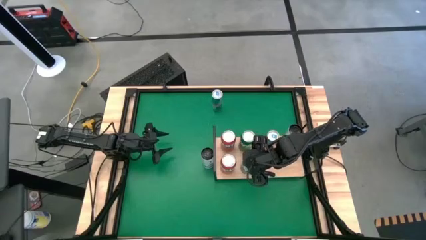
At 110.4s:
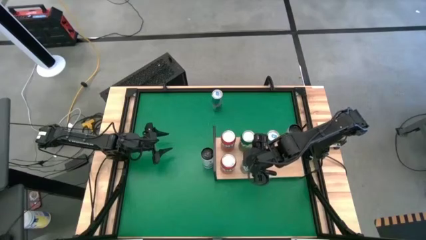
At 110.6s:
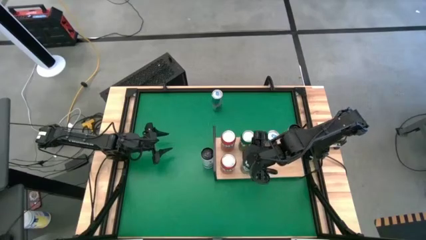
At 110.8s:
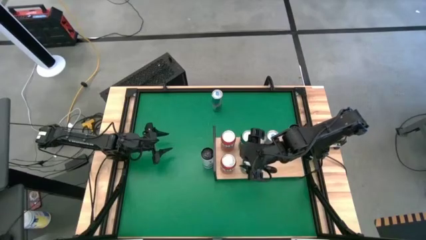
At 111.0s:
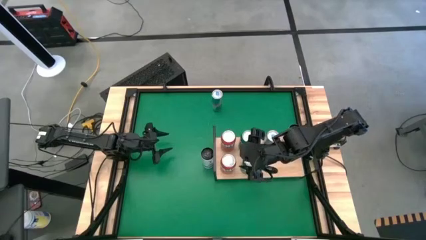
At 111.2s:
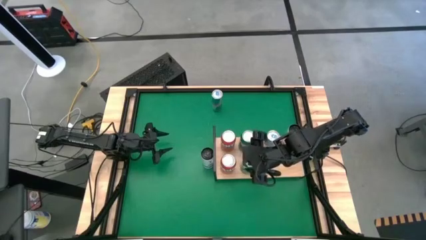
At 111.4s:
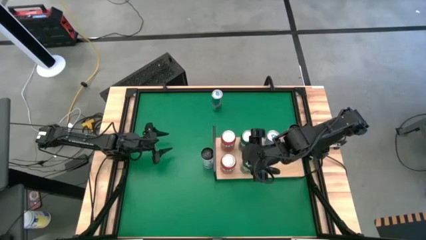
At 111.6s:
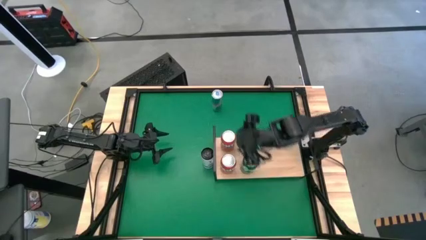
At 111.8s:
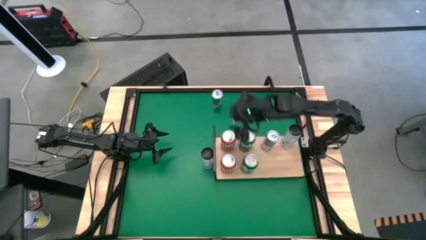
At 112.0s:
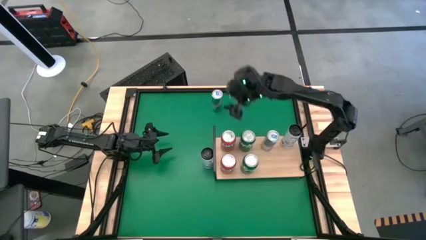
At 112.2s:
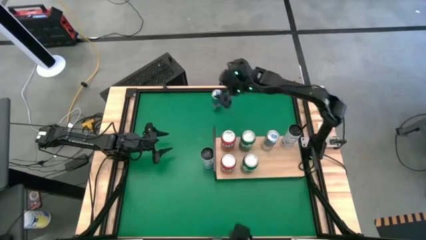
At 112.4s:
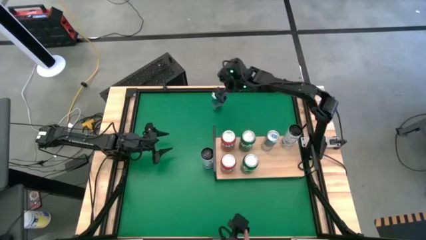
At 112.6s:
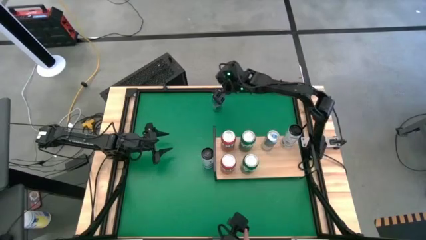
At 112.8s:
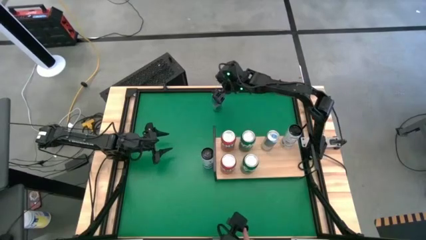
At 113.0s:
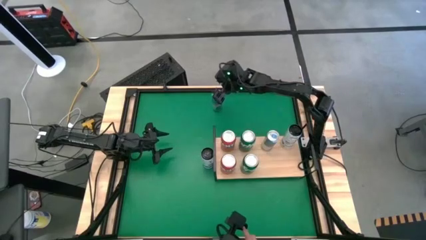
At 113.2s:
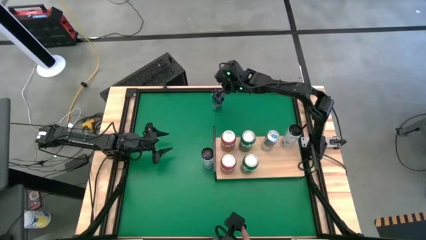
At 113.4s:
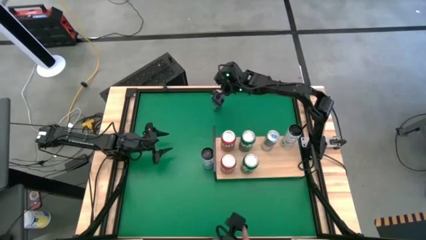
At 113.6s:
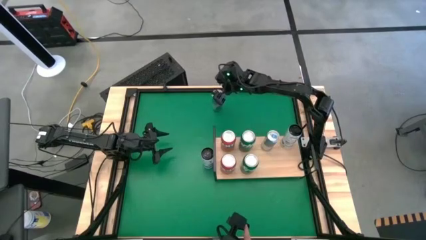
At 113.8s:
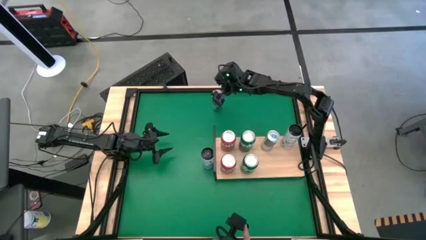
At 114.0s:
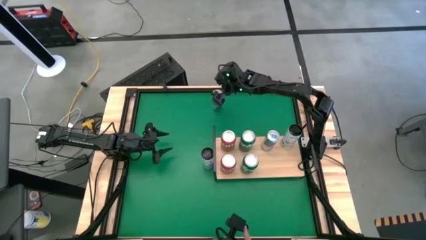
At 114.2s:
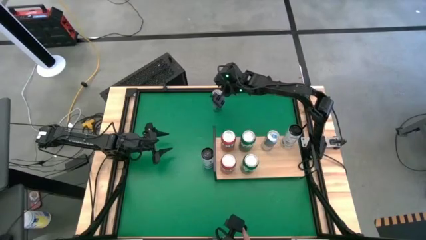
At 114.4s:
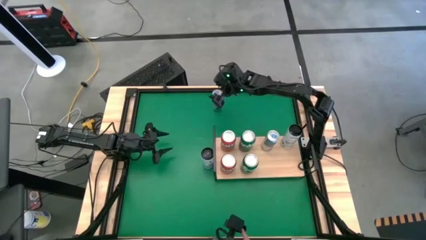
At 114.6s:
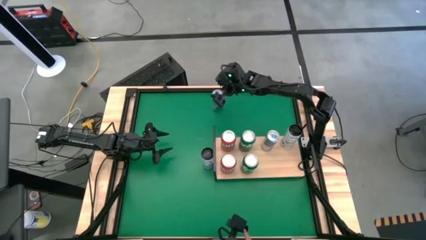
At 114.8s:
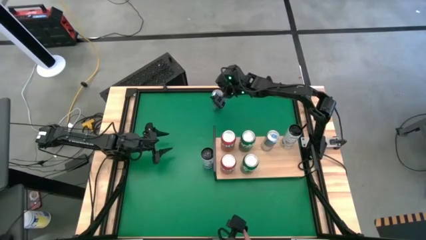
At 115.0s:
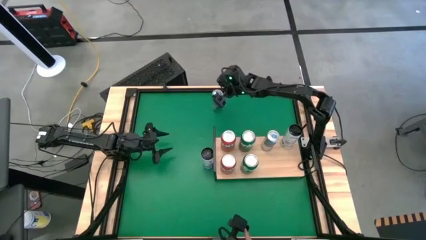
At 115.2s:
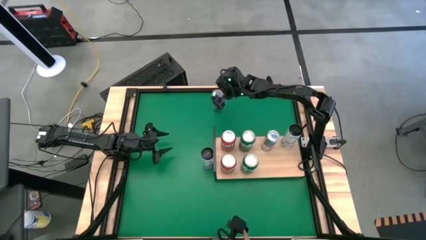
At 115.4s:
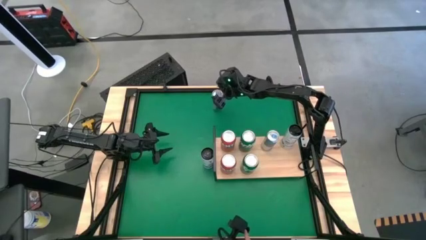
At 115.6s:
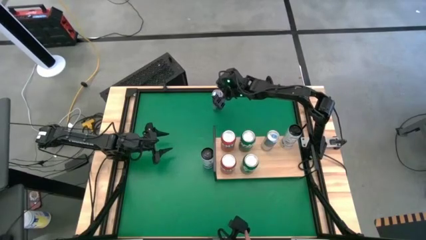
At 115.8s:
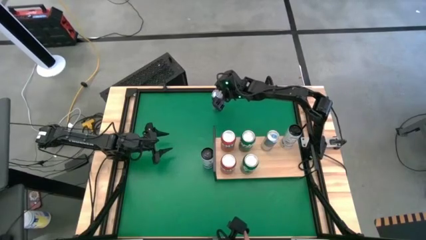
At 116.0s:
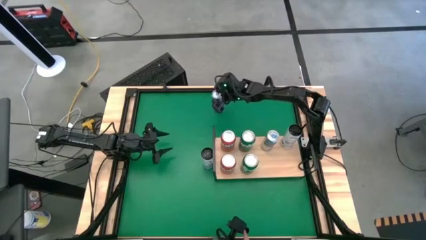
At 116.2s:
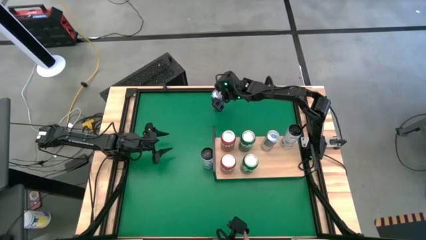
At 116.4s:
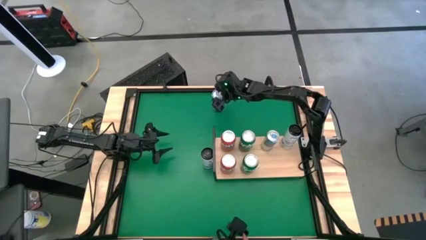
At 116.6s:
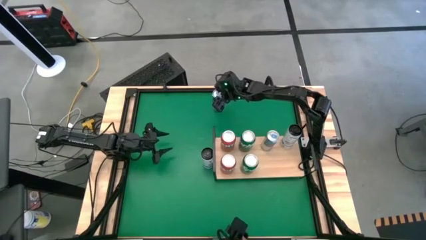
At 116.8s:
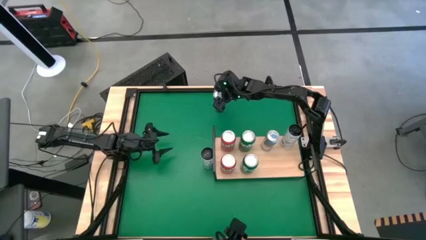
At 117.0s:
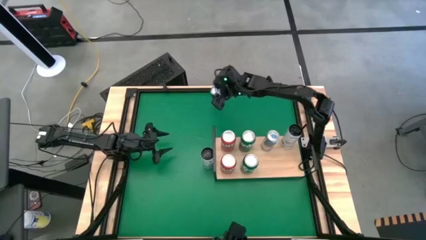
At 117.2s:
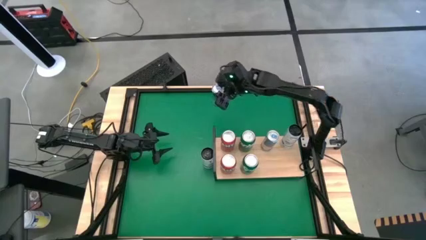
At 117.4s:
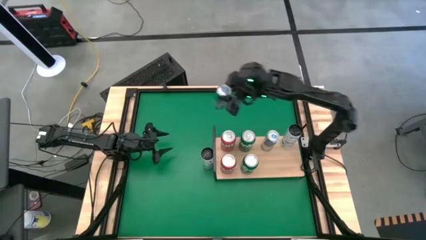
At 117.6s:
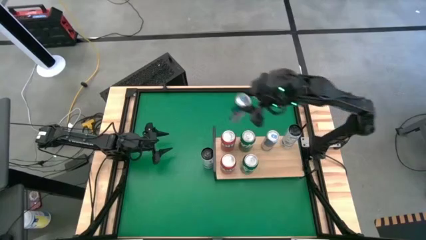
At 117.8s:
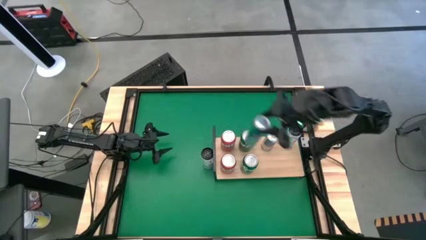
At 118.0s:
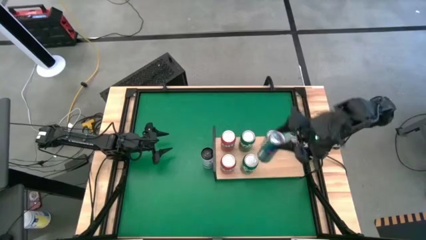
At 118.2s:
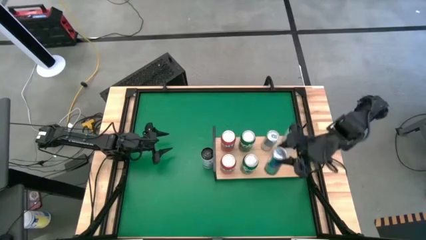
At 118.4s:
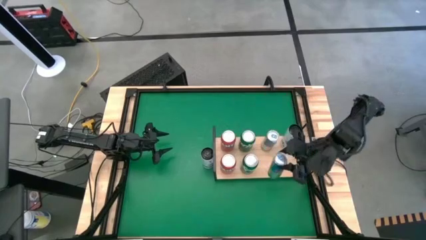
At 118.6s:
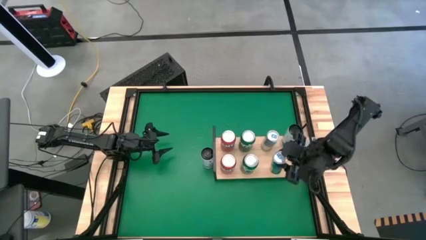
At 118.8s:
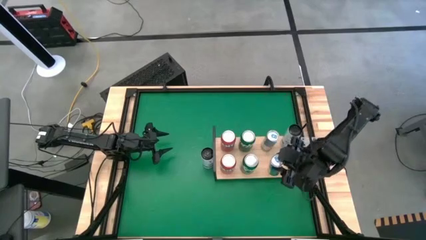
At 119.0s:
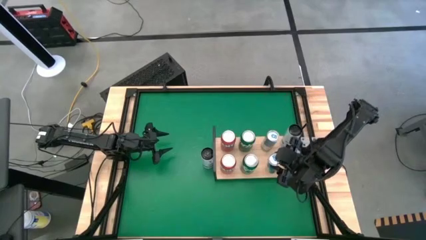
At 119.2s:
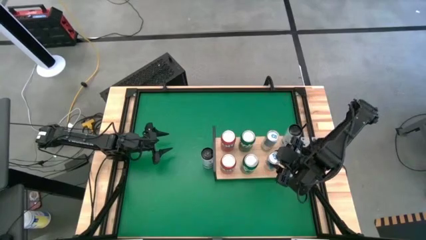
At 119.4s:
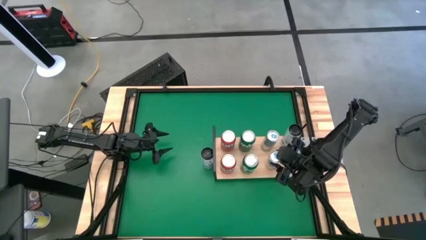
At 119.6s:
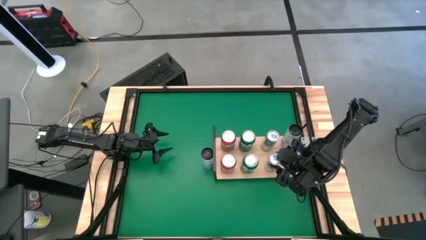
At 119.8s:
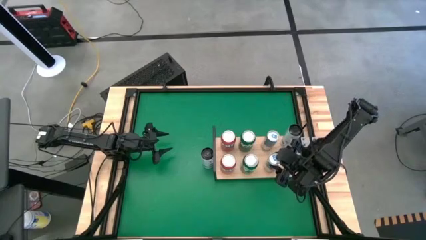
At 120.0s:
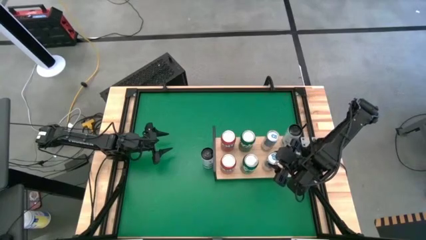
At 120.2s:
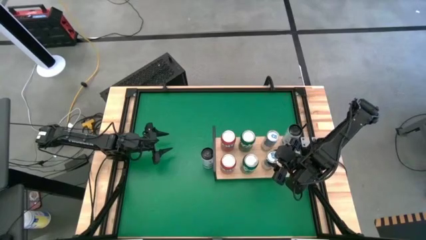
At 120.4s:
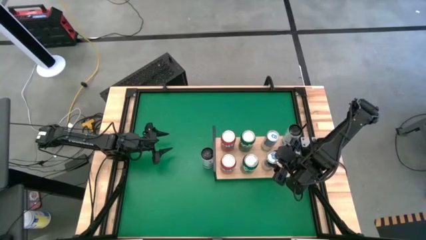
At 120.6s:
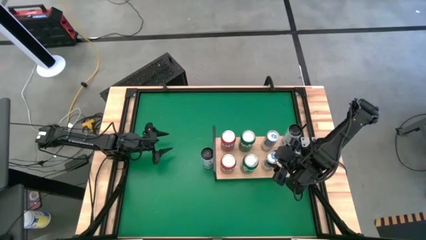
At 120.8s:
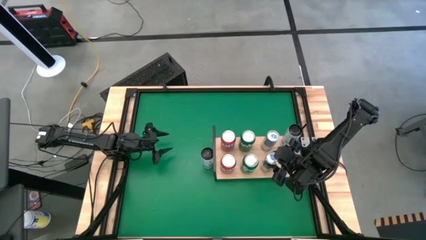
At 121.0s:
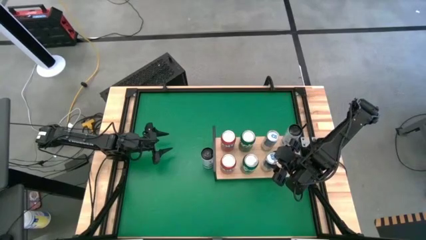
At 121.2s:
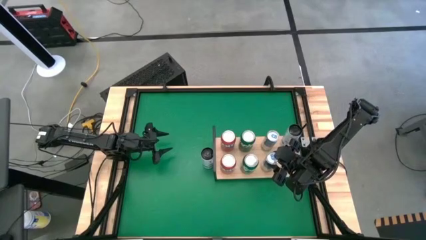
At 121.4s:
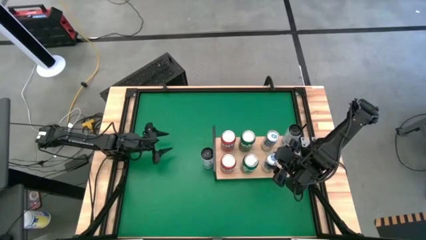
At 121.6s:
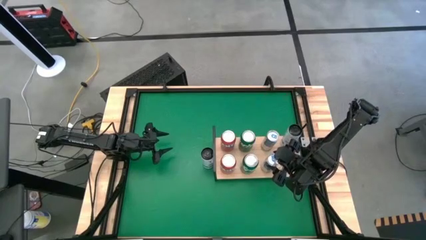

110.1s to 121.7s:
Task: Place canned beverage on shelf
Put the blue soda can on the shelf

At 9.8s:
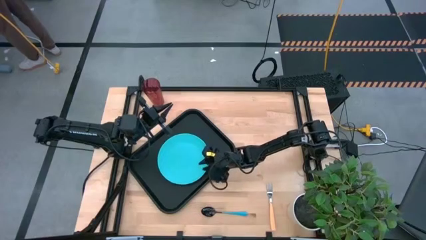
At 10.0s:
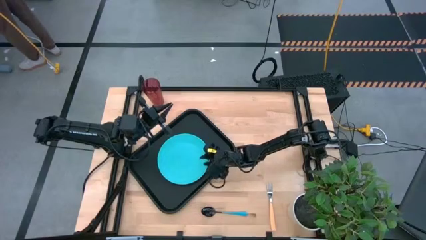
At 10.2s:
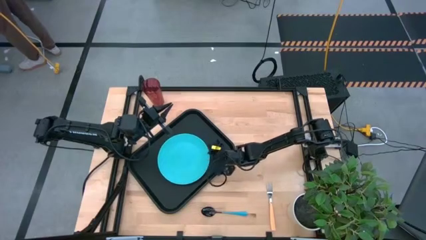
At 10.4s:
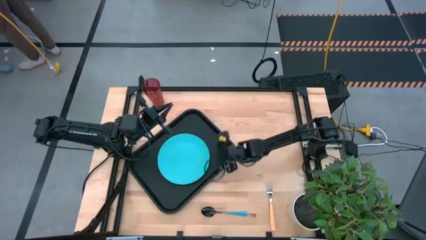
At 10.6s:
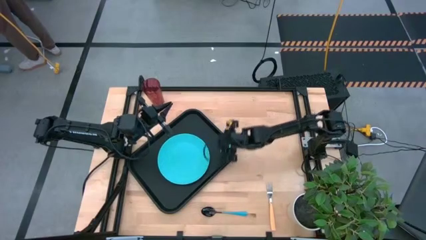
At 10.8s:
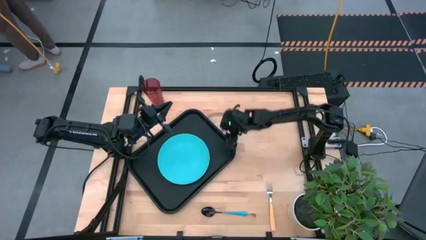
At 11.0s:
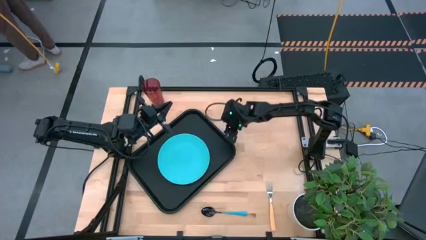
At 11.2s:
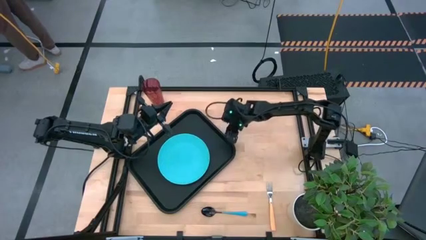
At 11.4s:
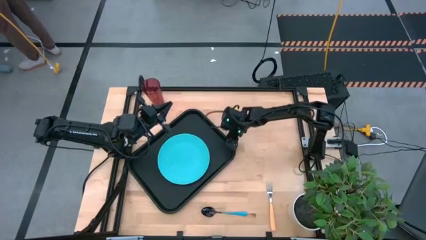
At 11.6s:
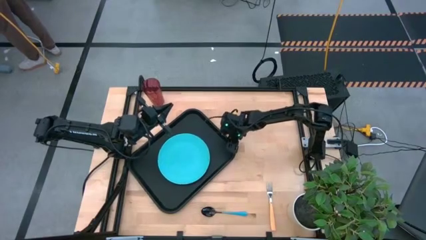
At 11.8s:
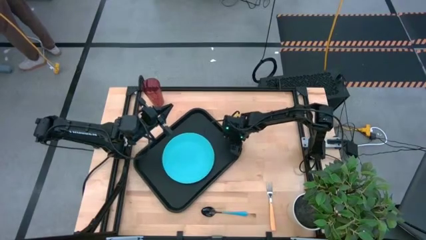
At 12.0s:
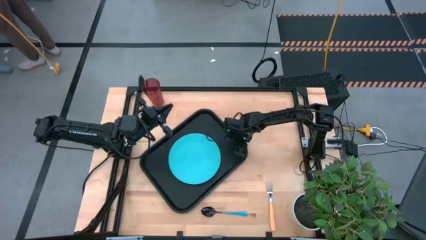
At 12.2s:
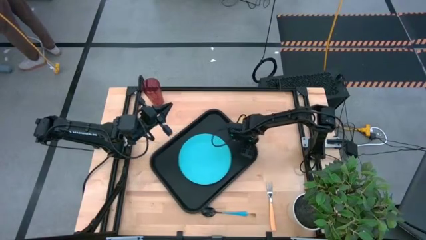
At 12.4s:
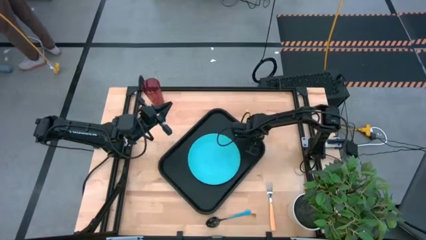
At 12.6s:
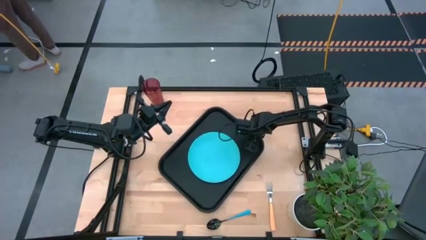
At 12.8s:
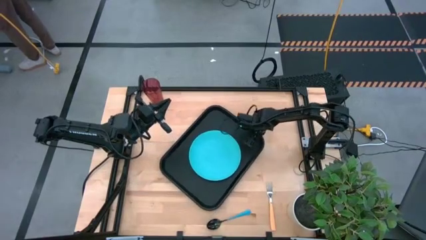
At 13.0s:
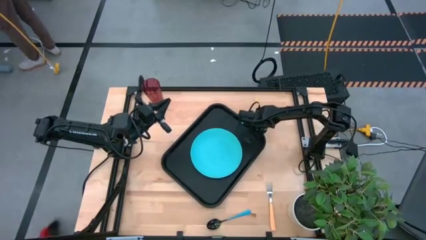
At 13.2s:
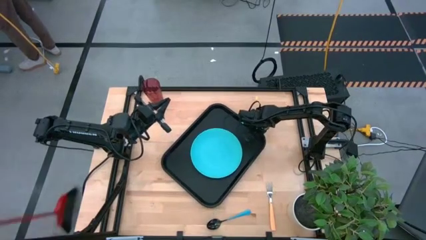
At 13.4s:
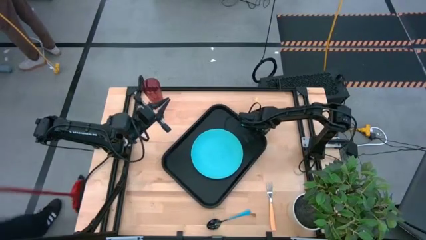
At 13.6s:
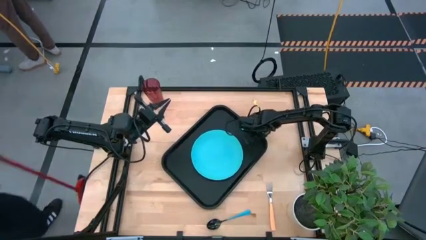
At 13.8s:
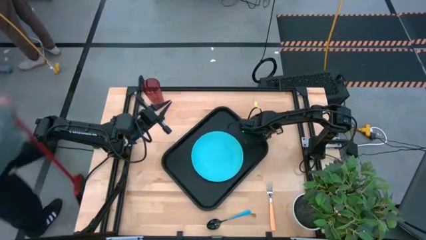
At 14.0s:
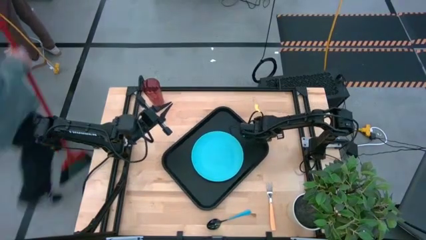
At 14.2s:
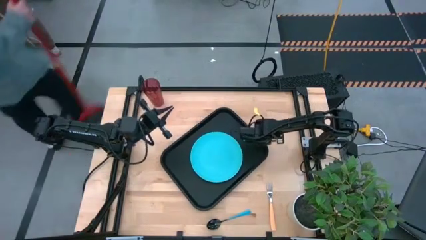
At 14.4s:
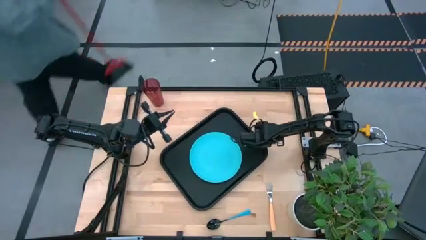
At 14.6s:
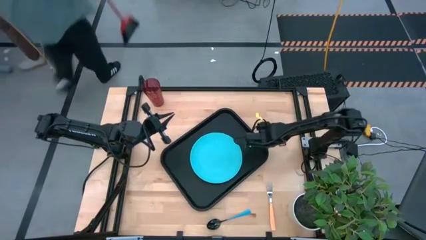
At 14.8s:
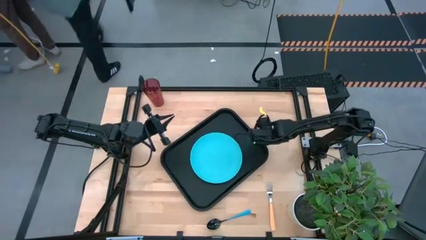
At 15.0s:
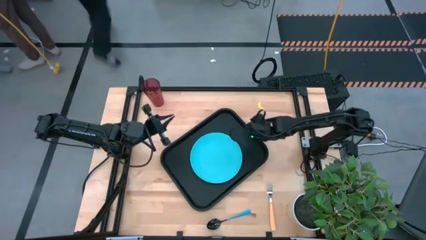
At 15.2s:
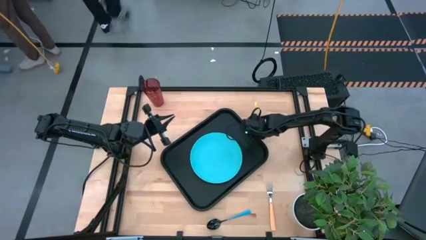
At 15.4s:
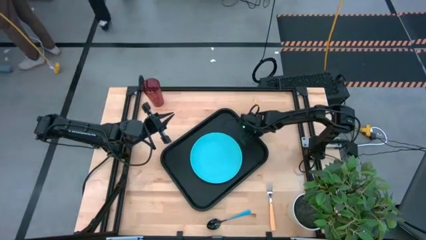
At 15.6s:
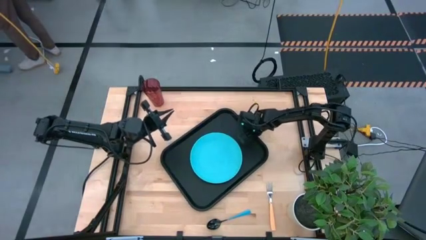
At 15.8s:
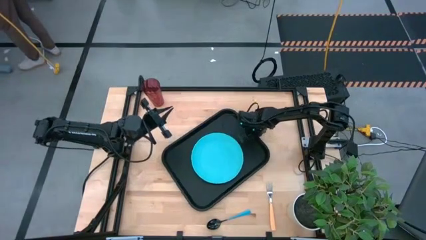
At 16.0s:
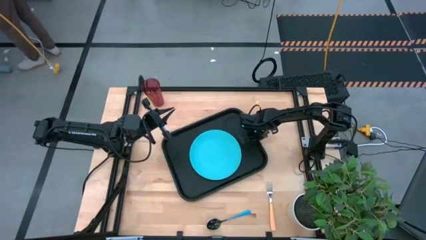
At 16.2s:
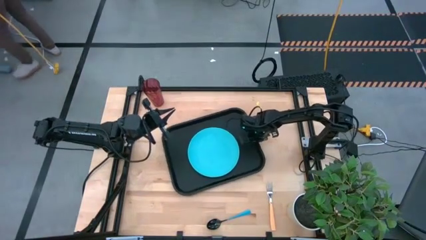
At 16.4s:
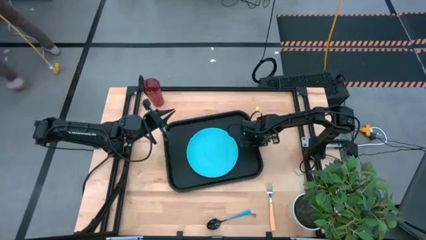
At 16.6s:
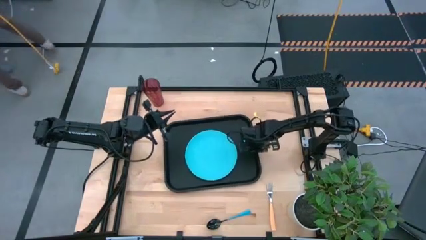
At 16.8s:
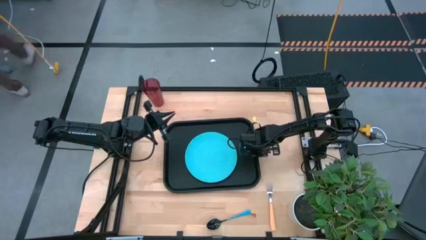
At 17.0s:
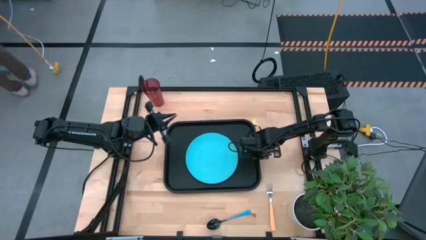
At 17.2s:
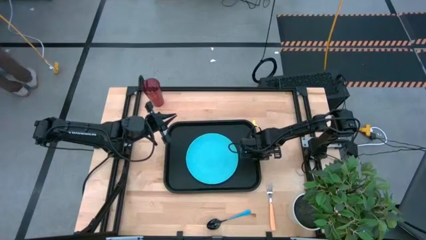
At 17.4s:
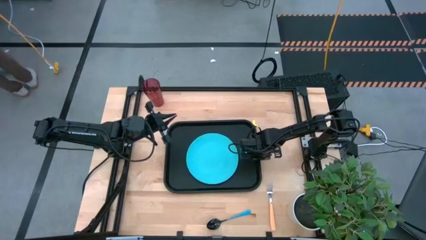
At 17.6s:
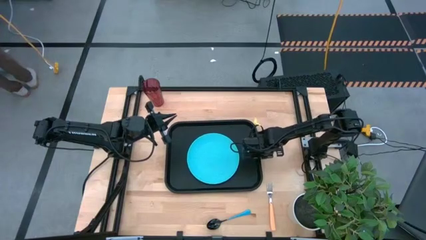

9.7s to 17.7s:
Task: Pick and place plate/cup/fork/spoon on tray
Adjust the tray
